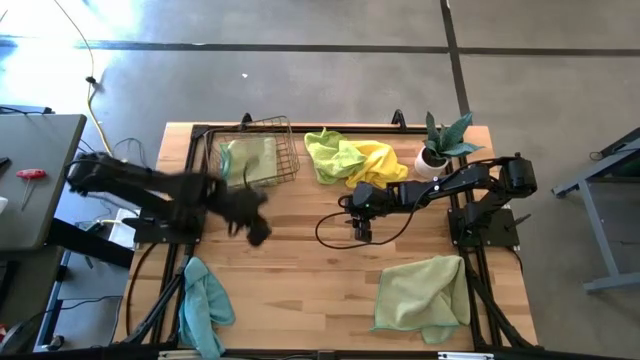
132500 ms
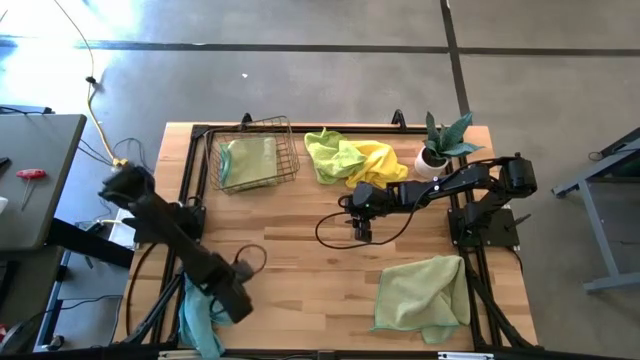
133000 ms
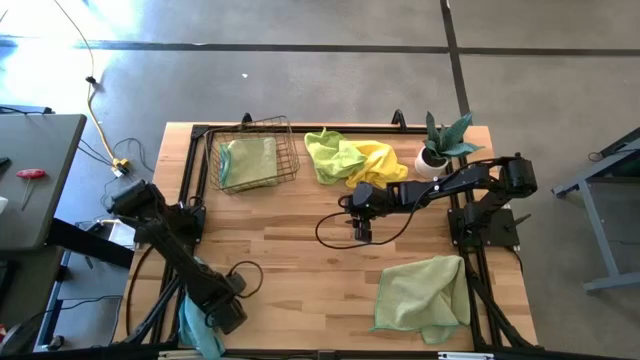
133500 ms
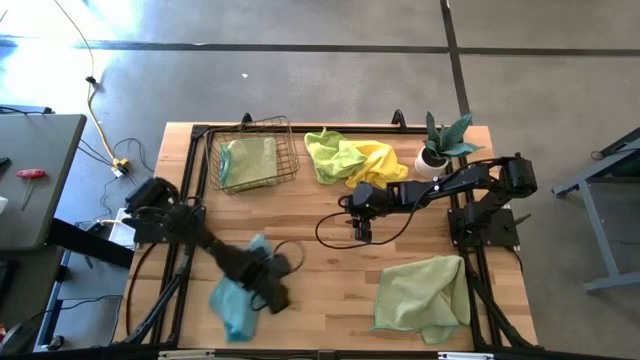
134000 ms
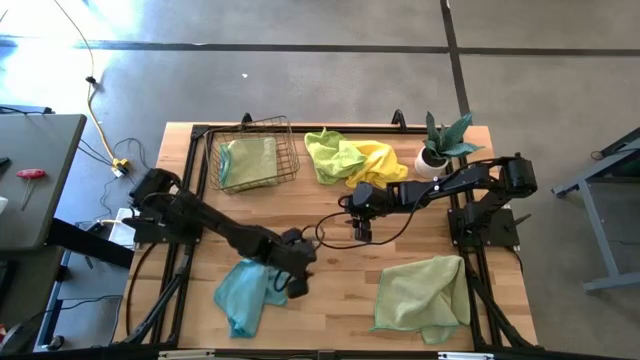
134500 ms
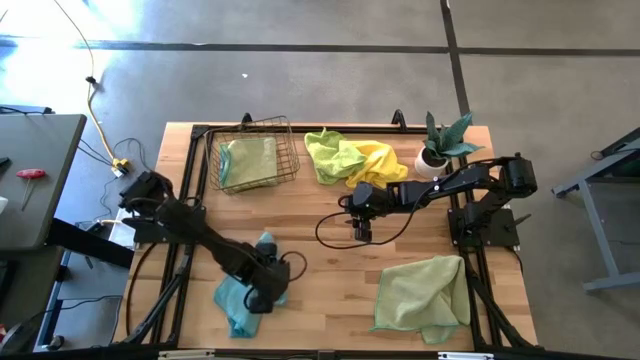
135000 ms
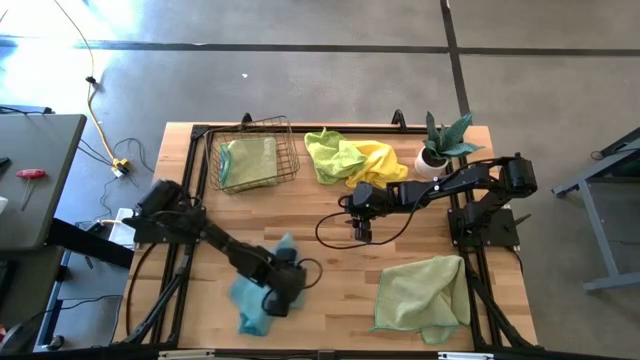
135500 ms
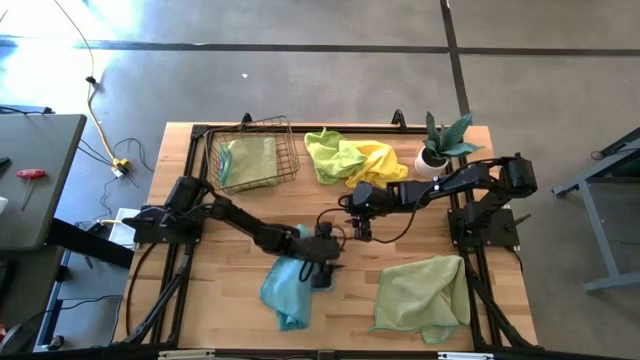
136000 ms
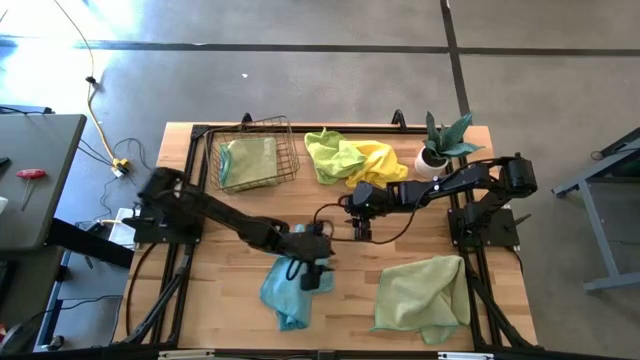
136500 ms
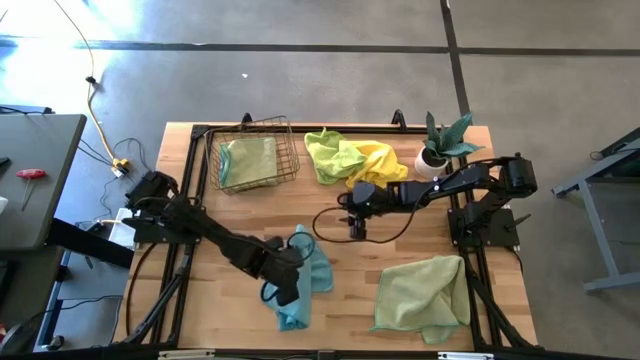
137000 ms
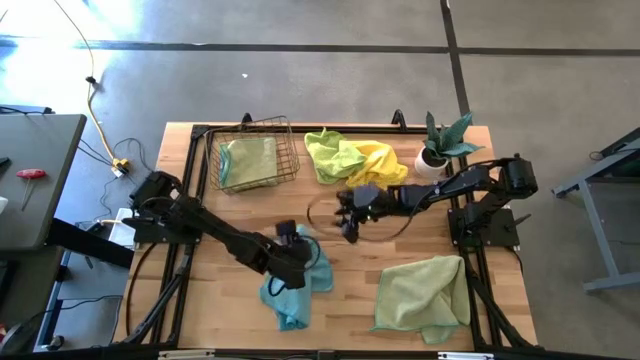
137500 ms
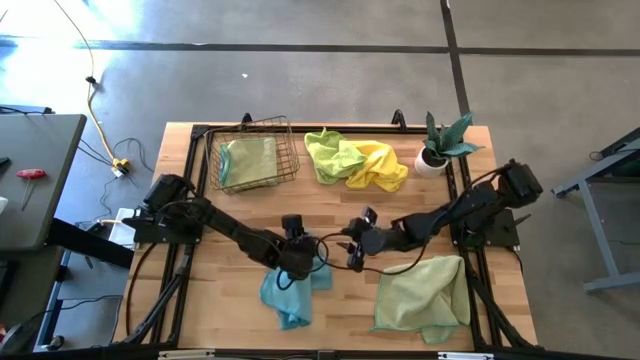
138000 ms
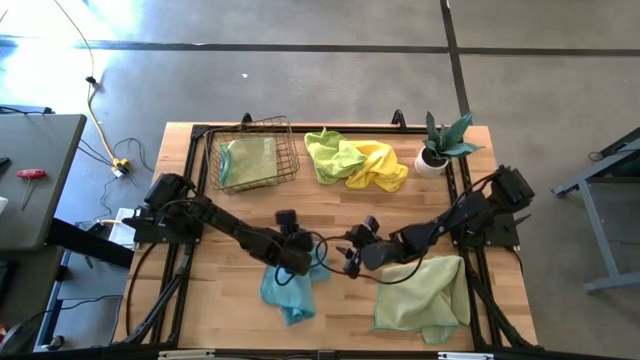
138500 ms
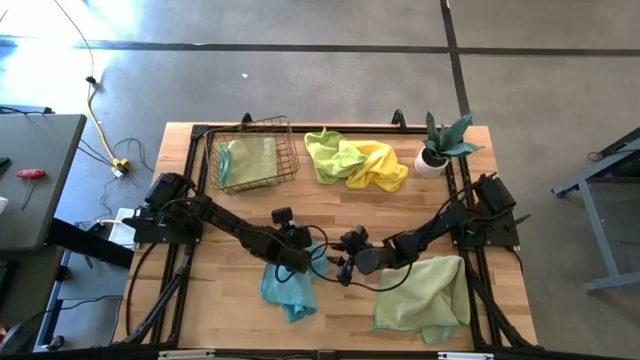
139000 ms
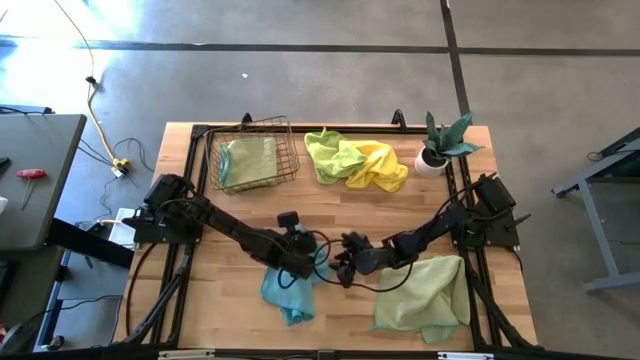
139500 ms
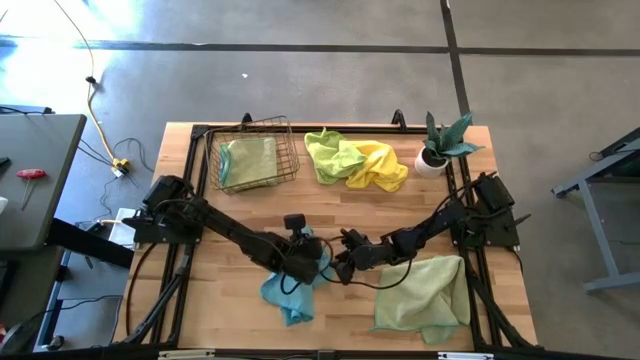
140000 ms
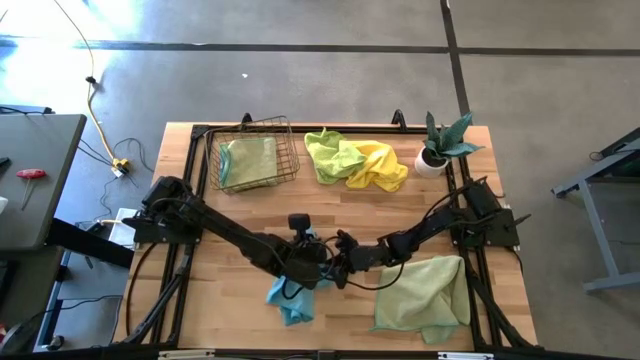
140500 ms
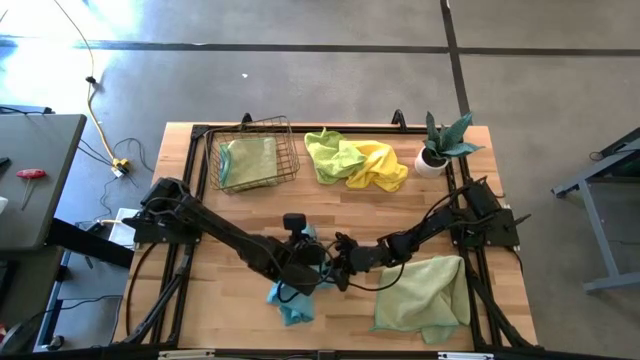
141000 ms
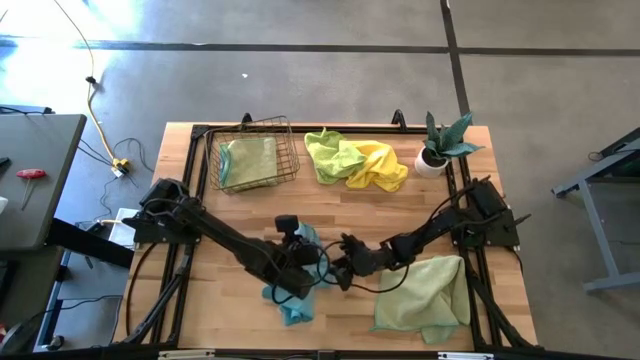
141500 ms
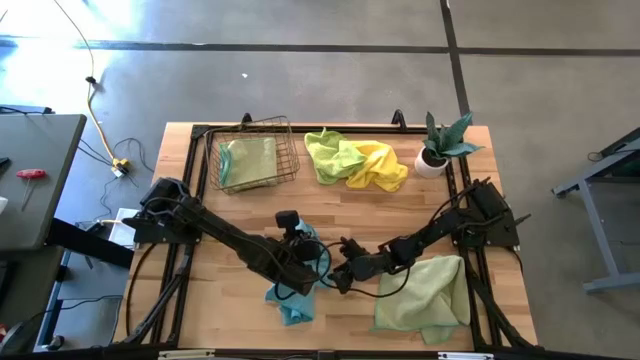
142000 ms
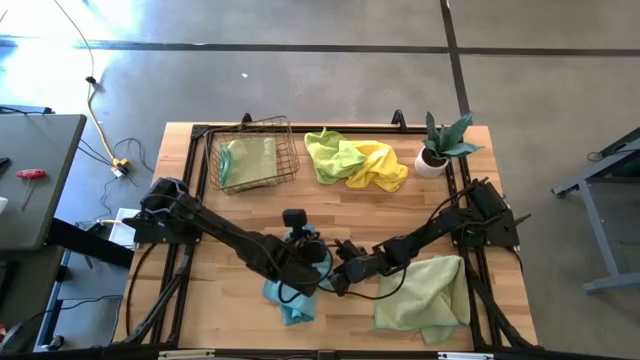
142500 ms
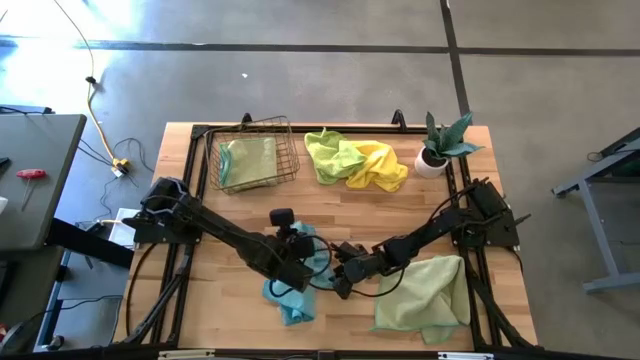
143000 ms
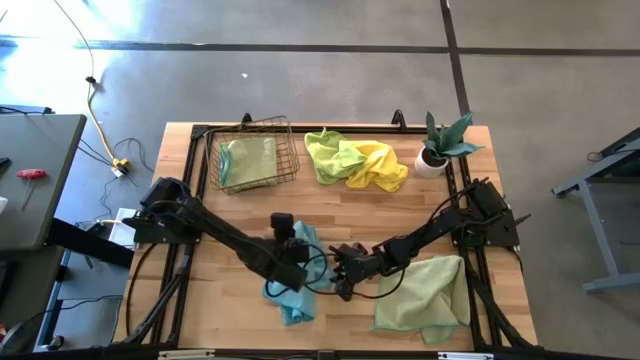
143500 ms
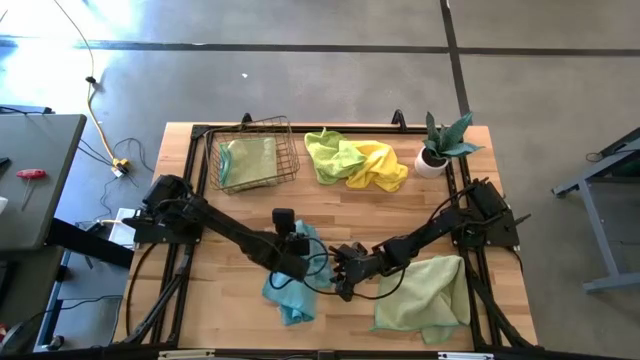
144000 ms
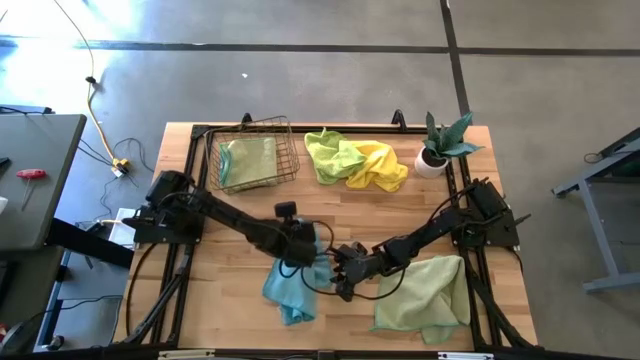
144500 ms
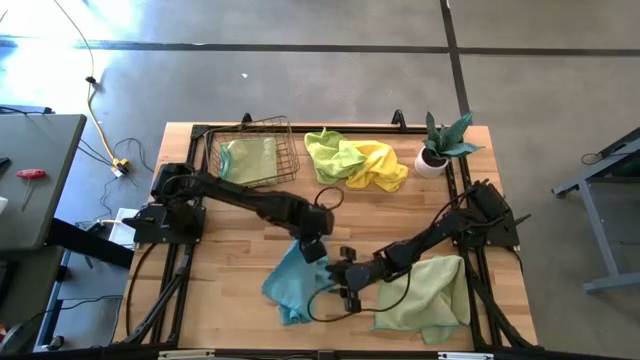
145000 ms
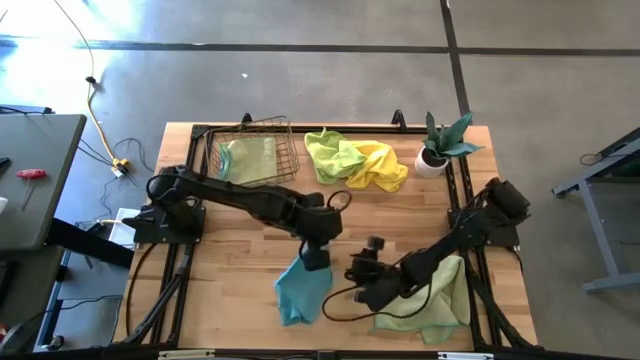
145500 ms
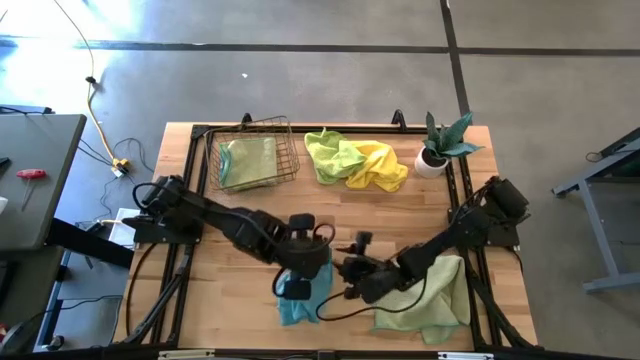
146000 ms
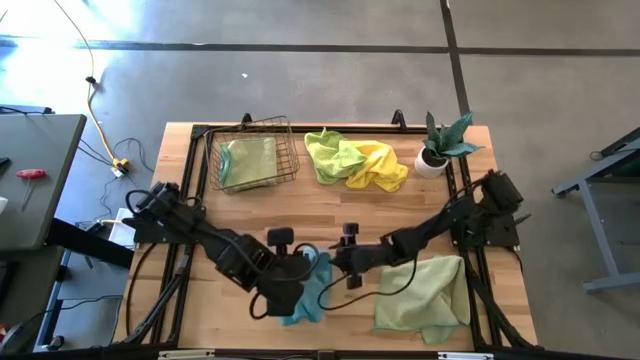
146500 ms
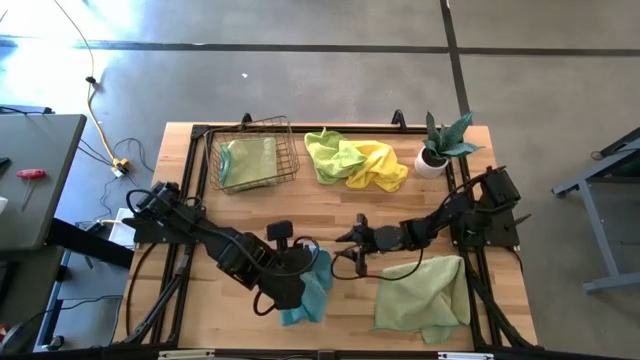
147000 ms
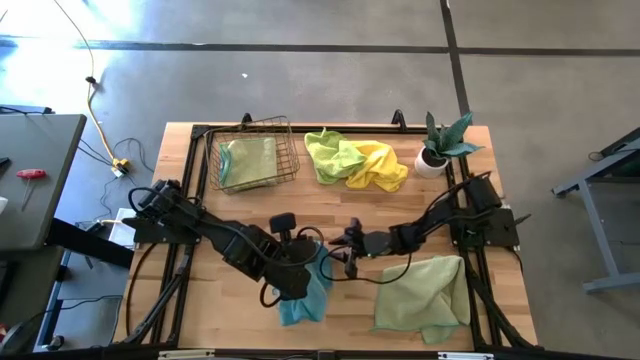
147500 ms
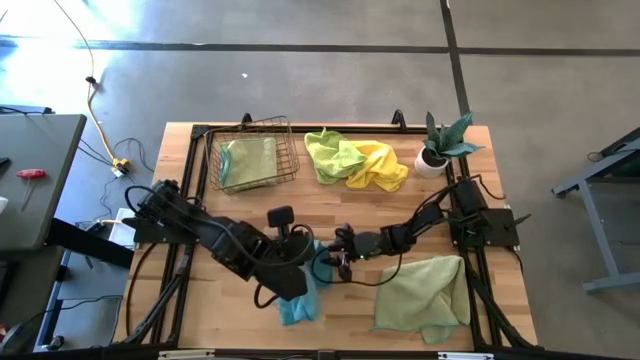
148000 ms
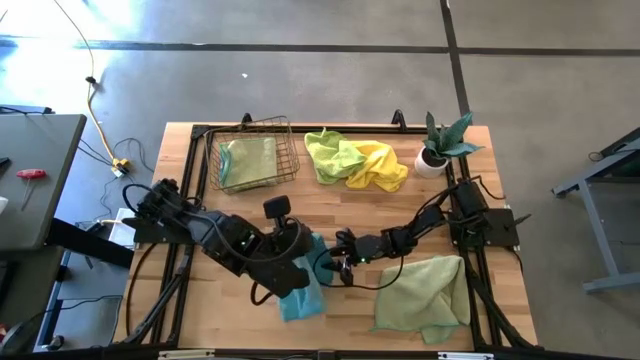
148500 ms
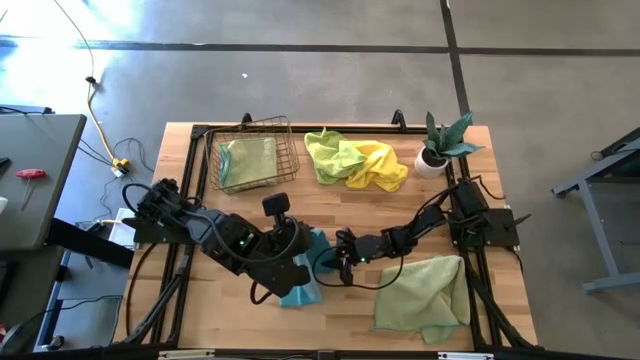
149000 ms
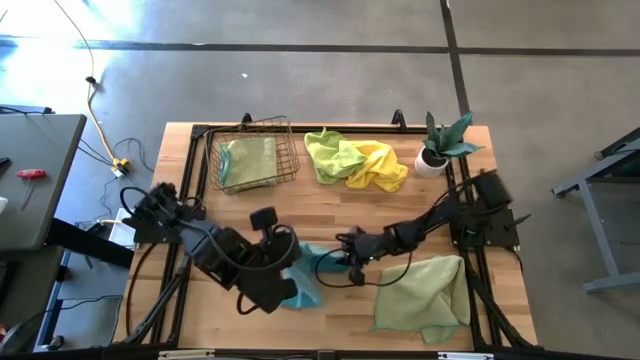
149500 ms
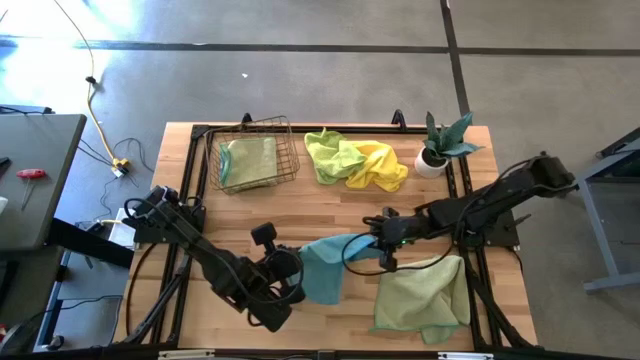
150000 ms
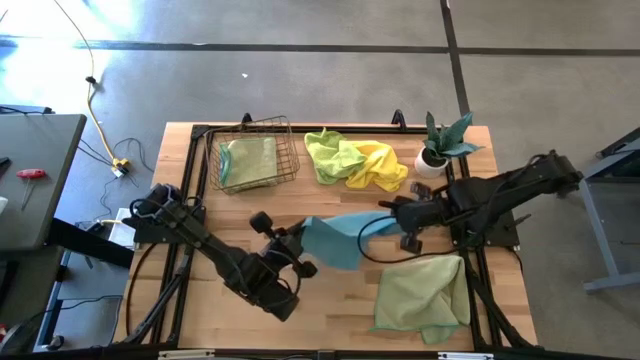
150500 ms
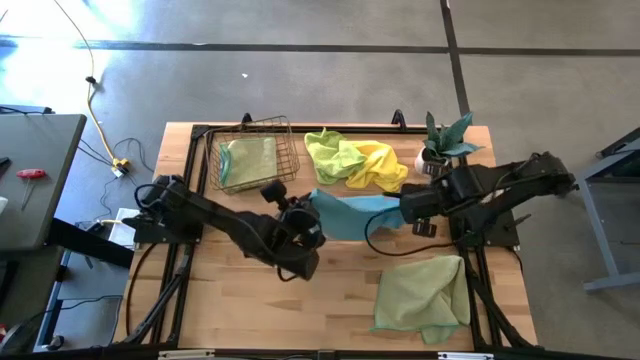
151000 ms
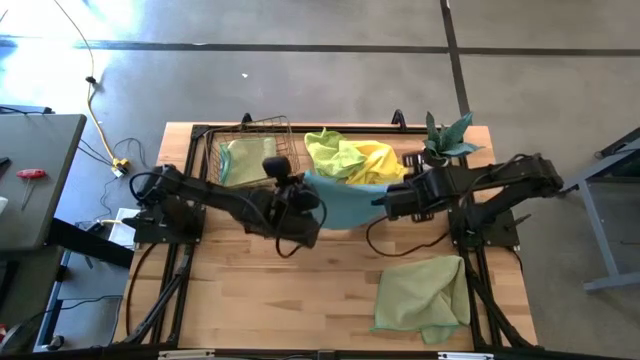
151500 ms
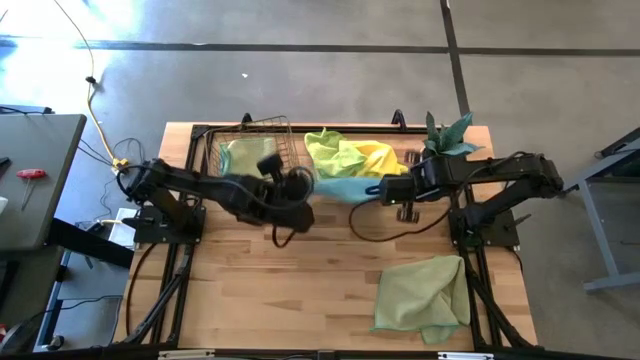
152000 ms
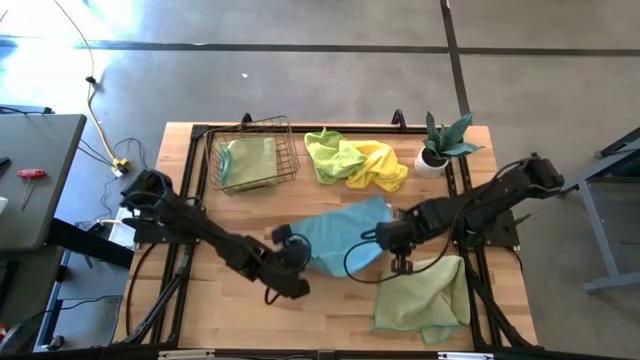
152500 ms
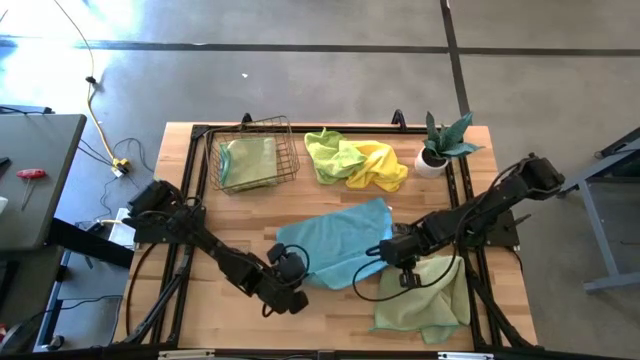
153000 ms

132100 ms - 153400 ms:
Task: Fold microfiber towels
Fold the blue towel

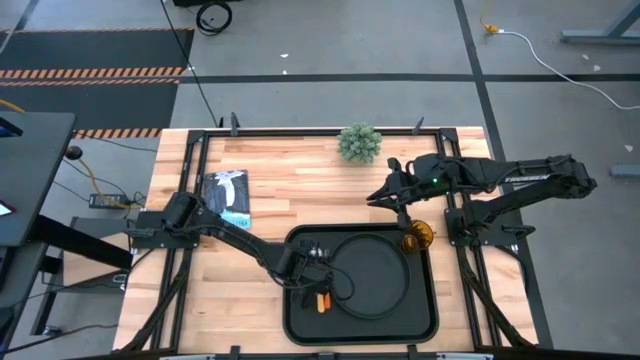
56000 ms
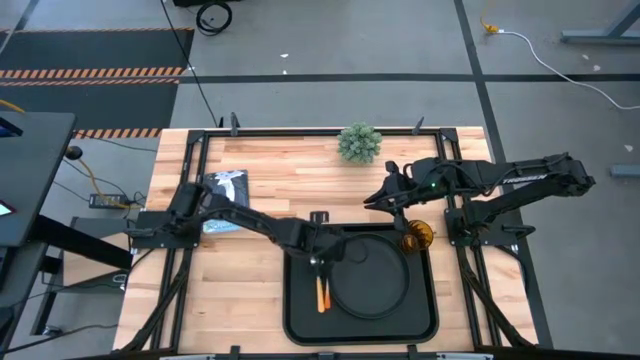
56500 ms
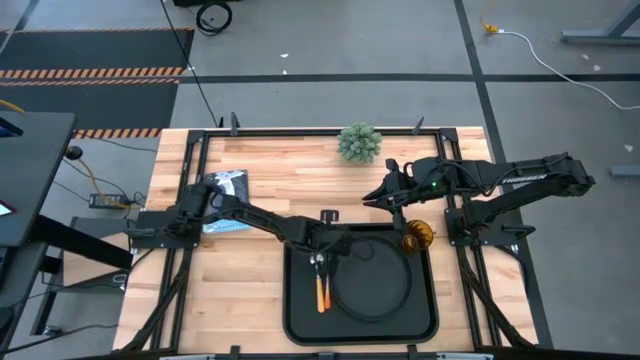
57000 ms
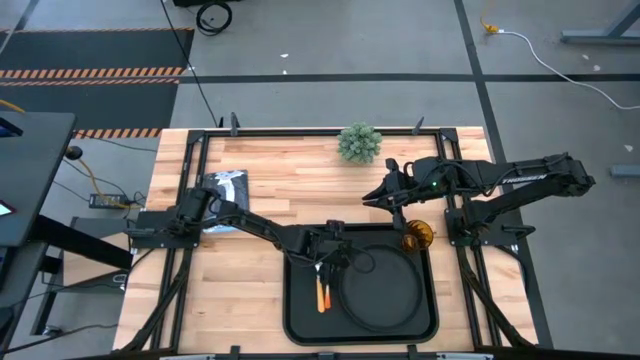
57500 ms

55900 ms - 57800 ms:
Task: Pick and place plate/cup/fork/spoon on tray
Adjust the black plate on the black serving tray
